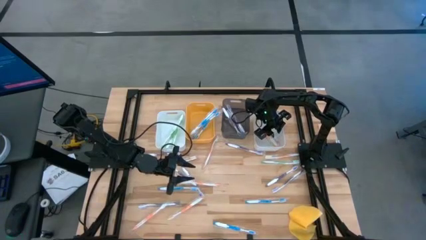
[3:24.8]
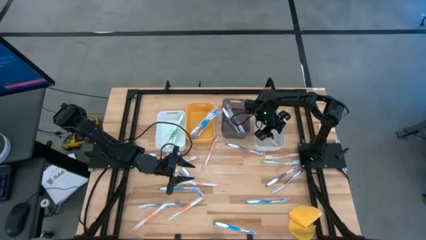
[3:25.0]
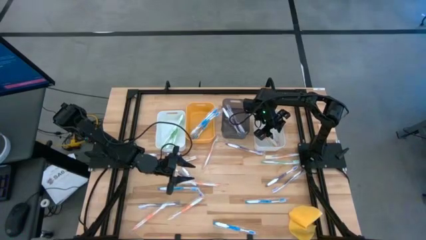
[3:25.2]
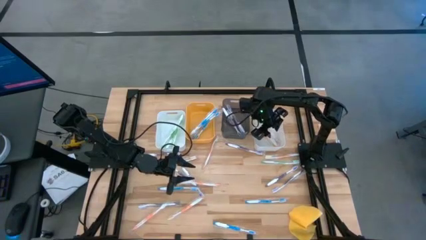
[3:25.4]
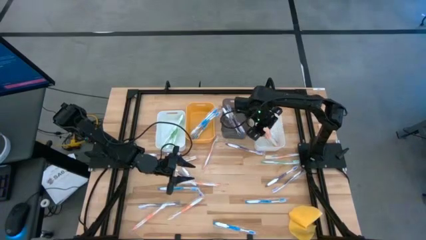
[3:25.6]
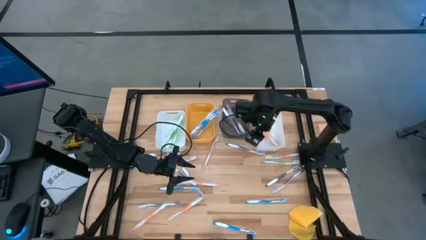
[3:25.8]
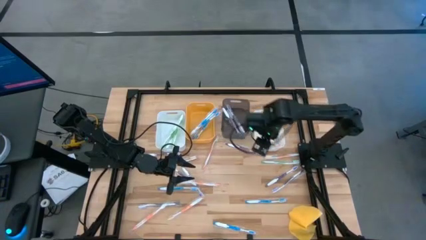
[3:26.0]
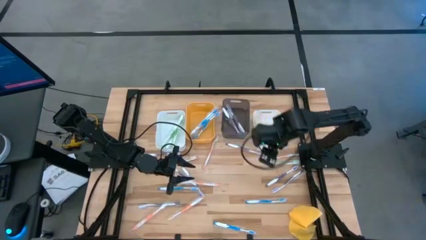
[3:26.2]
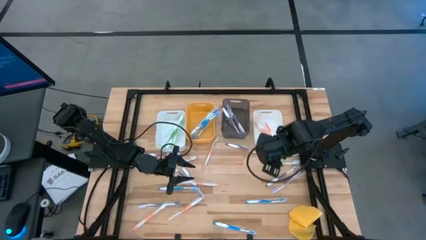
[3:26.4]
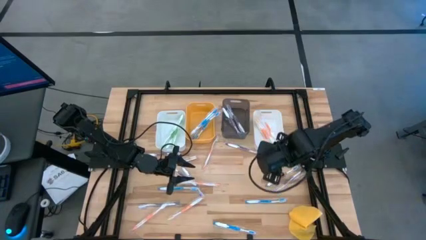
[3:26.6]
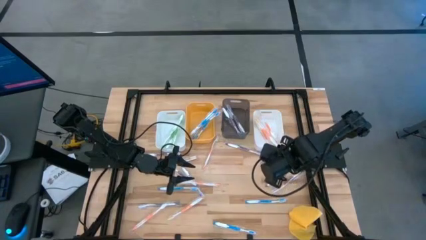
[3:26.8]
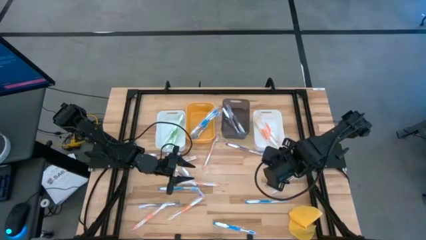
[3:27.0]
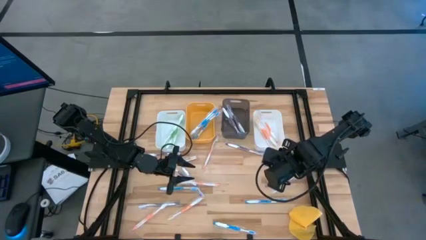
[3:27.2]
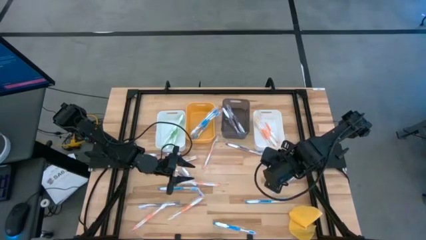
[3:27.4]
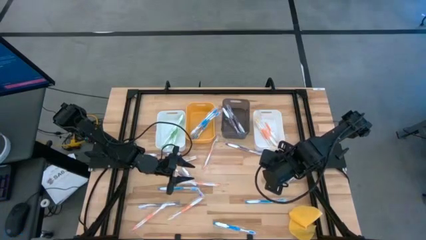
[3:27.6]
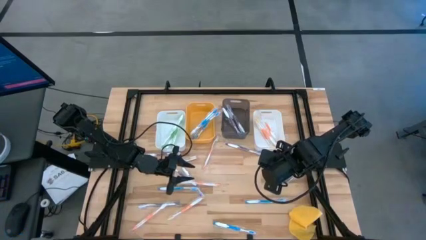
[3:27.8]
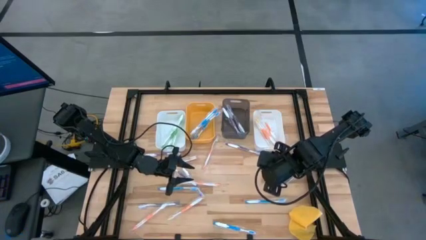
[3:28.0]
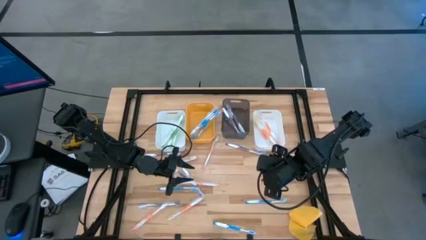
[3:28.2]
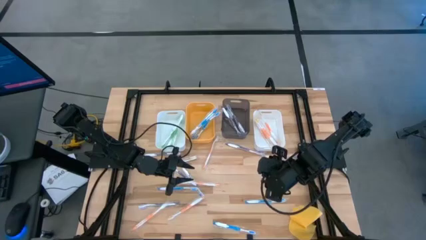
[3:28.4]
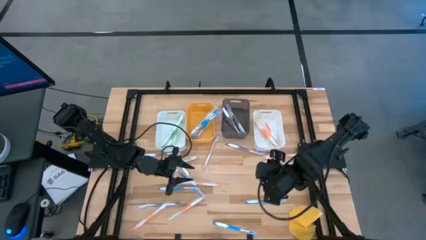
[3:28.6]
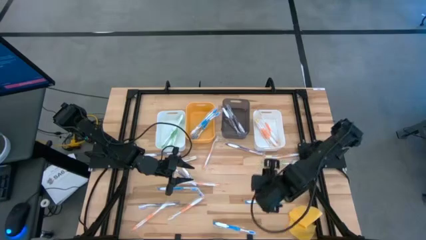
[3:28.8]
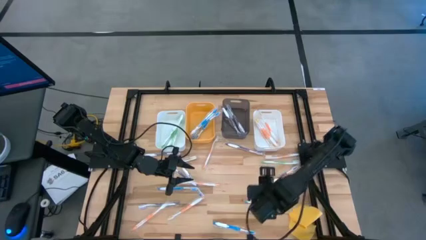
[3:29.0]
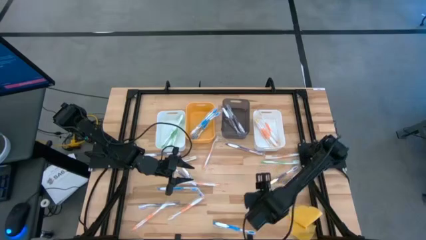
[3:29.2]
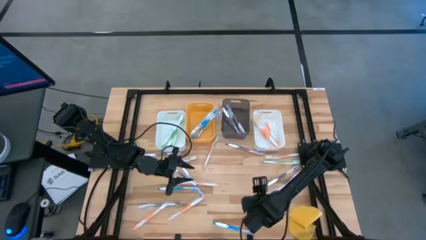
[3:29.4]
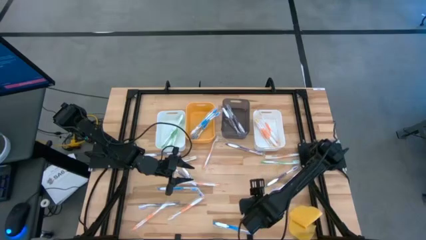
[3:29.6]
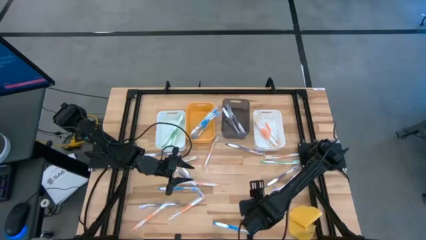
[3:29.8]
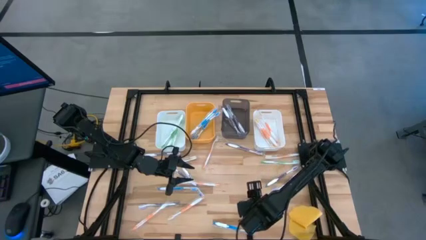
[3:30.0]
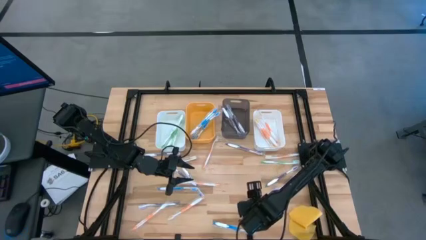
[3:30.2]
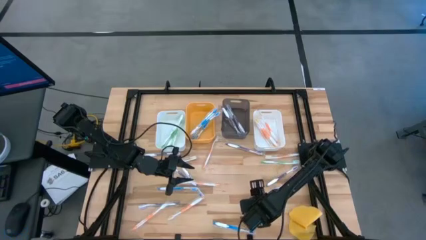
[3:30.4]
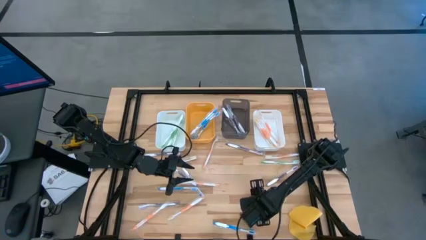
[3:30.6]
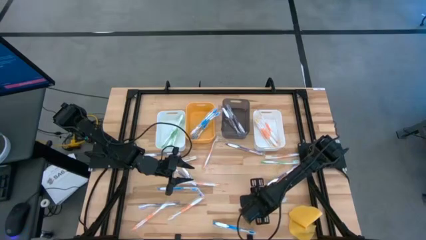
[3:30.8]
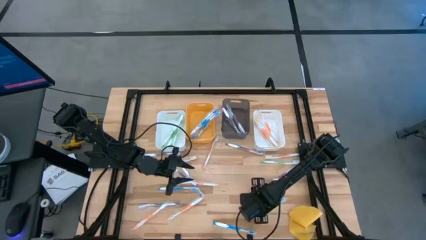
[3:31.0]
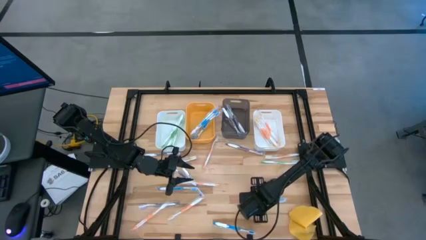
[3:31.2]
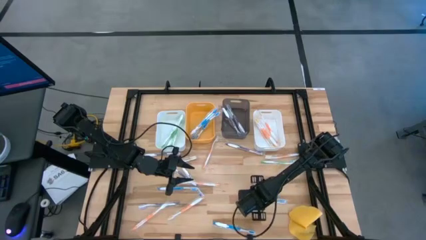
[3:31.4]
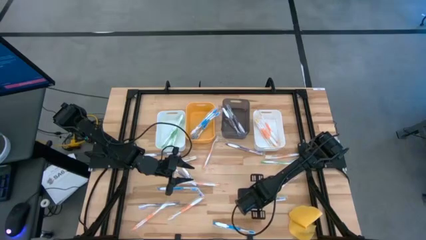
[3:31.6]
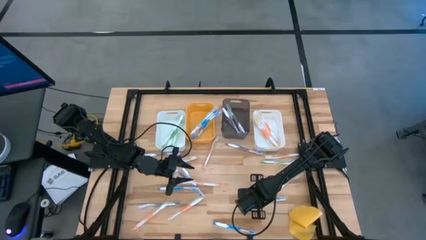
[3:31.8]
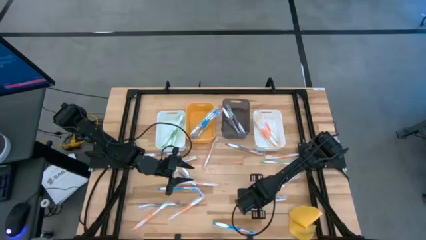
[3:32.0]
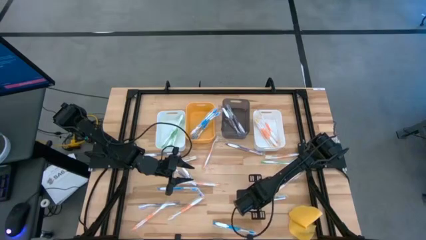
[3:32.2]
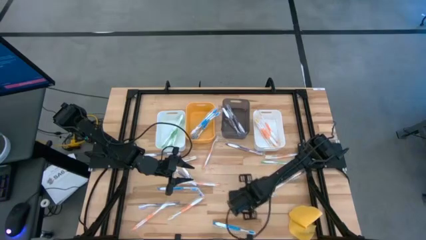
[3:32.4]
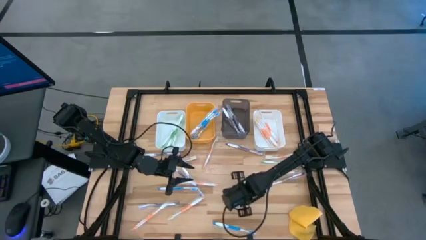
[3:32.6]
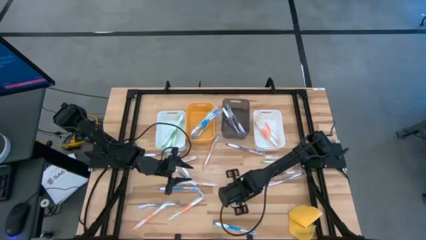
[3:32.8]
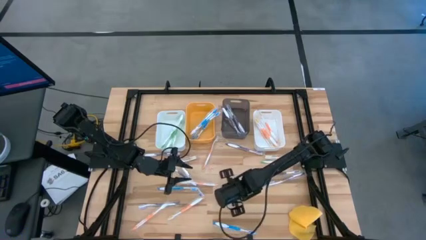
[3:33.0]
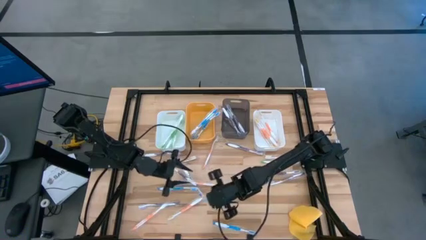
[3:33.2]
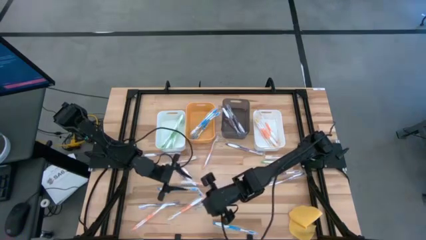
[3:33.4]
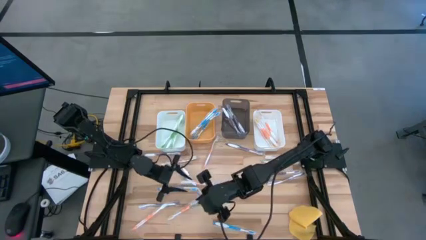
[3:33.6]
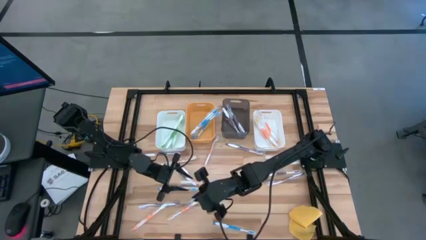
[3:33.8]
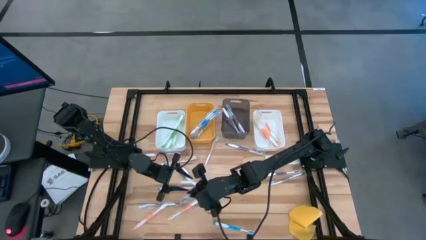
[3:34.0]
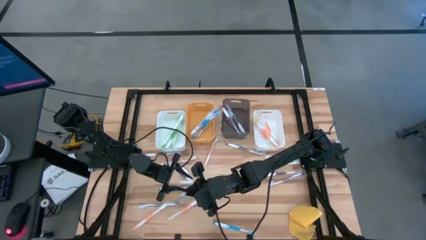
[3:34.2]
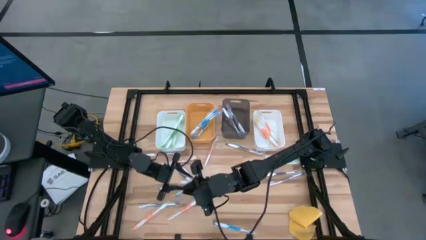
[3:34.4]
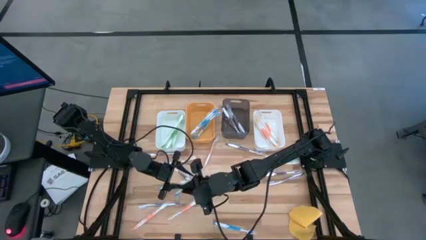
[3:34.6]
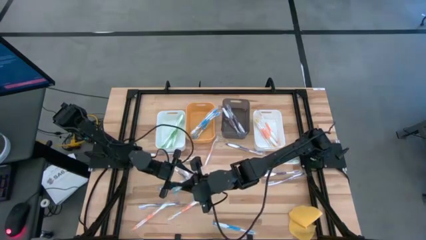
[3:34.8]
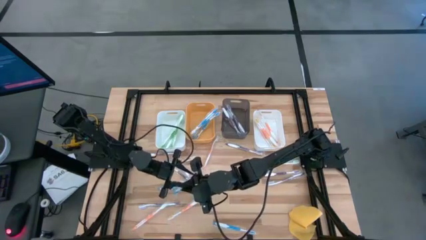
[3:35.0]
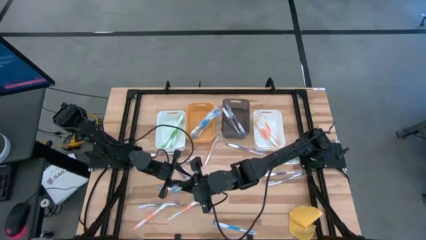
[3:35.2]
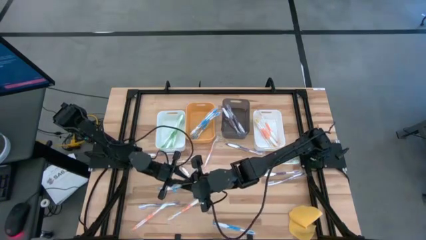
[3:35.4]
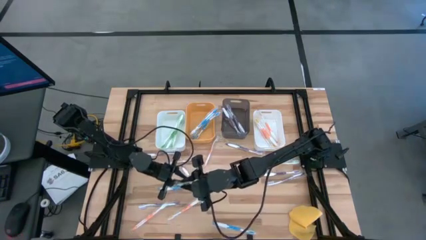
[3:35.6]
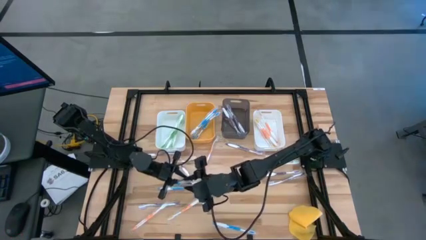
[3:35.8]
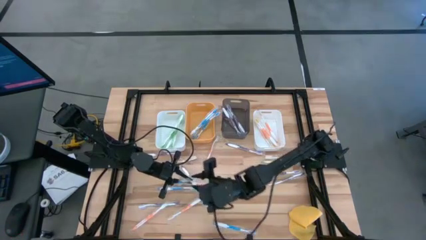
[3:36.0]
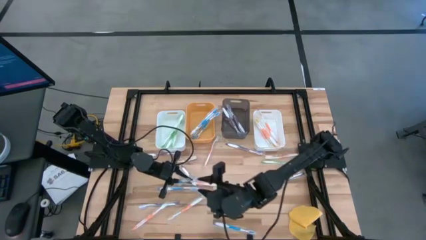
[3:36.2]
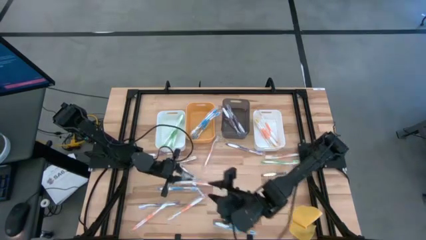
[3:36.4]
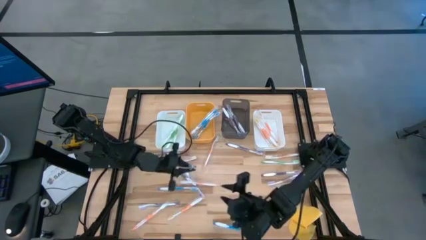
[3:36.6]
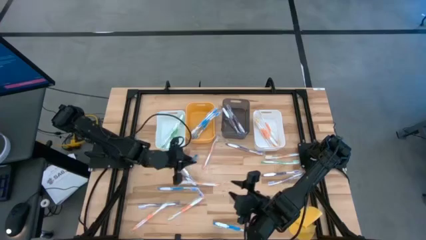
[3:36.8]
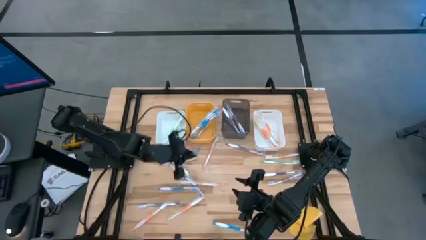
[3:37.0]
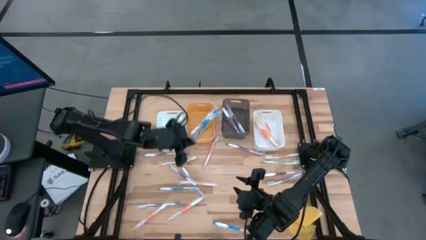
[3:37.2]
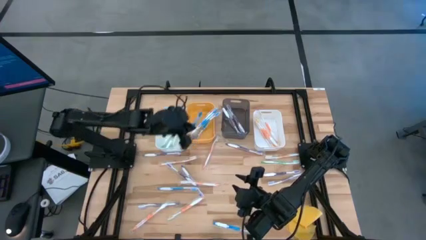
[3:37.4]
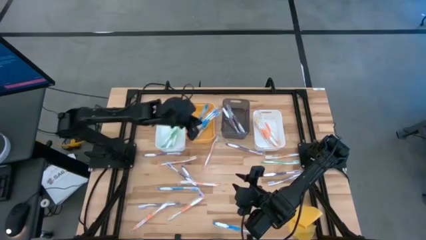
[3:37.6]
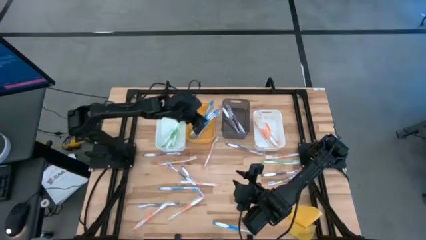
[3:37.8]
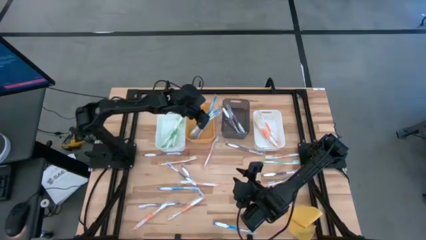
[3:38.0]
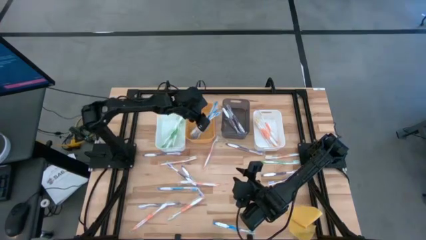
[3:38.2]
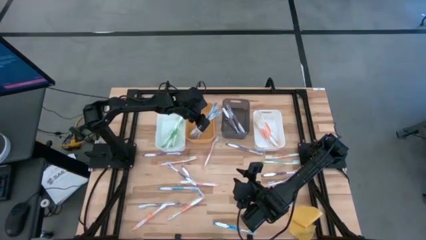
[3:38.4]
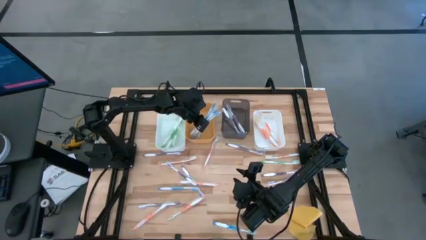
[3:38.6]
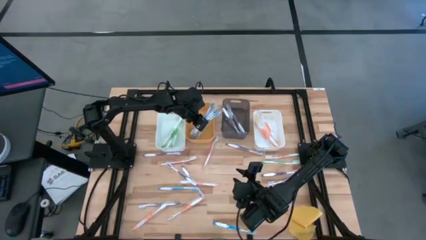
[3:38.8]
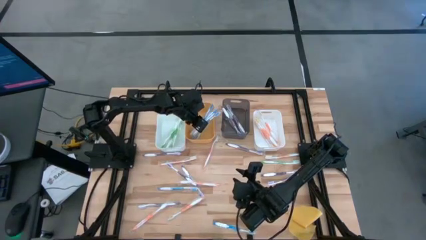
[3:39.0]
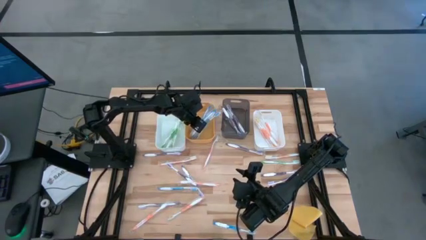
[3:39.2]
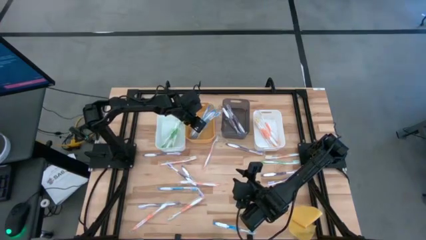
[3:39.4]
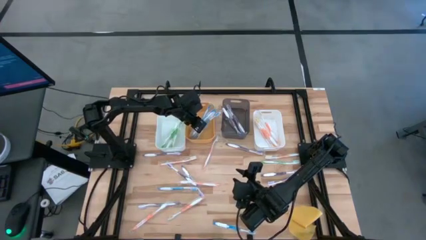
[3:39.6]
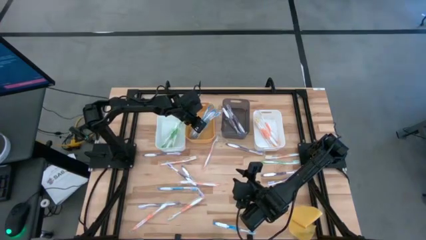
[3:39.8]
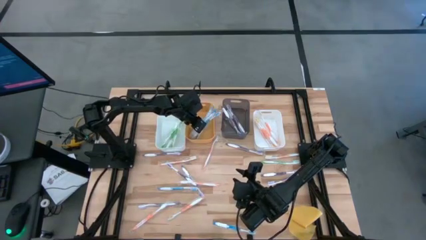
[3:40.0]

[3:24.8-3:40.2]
Task: Pick & Place Toothbrushes
Put the top right blue toothbrush into the orange bin
